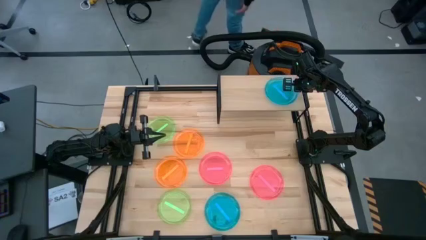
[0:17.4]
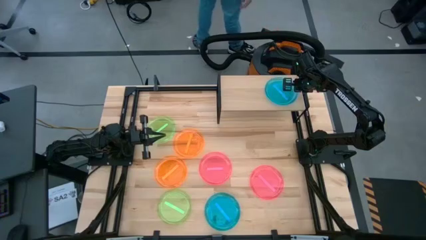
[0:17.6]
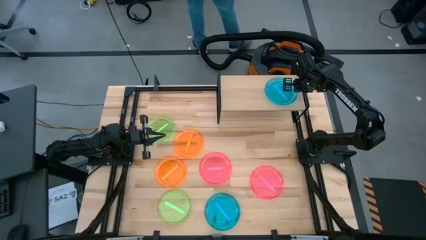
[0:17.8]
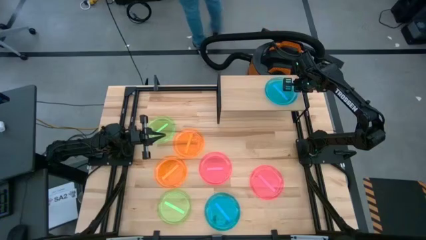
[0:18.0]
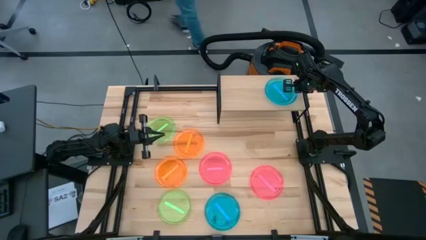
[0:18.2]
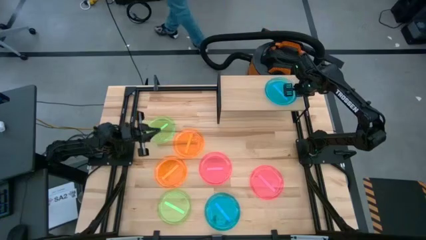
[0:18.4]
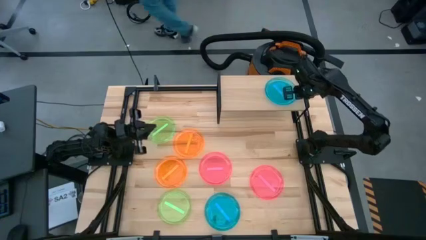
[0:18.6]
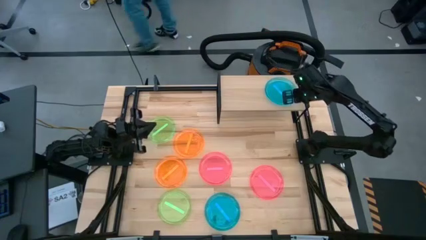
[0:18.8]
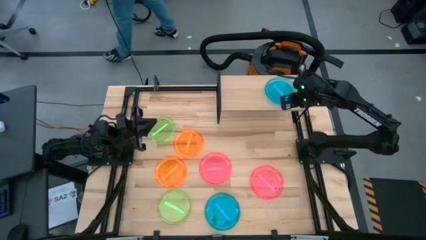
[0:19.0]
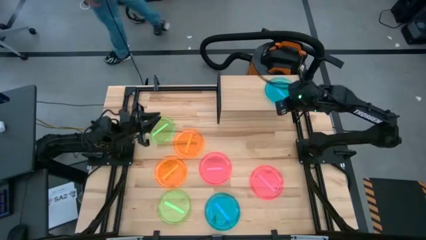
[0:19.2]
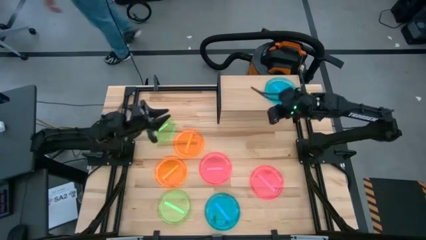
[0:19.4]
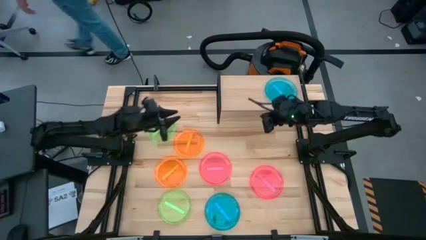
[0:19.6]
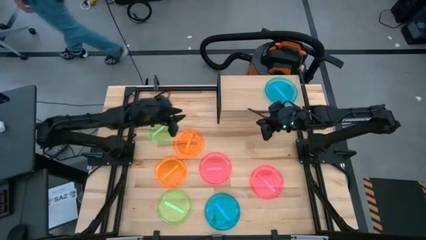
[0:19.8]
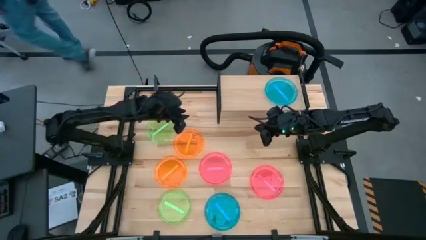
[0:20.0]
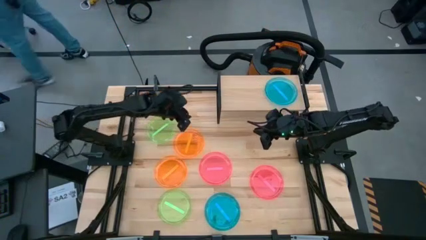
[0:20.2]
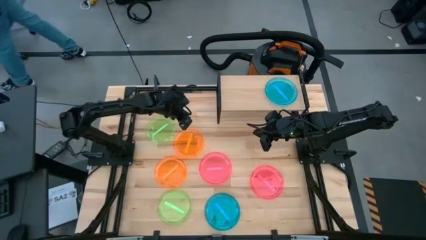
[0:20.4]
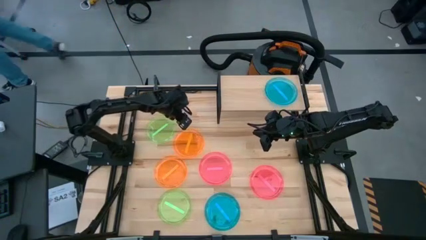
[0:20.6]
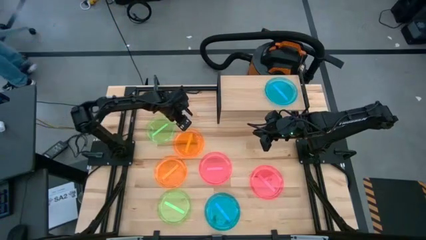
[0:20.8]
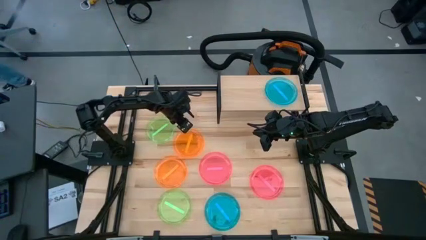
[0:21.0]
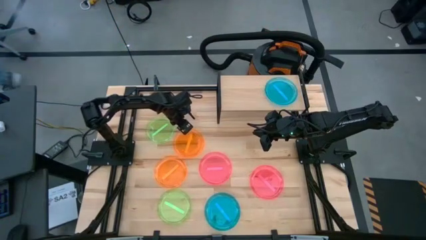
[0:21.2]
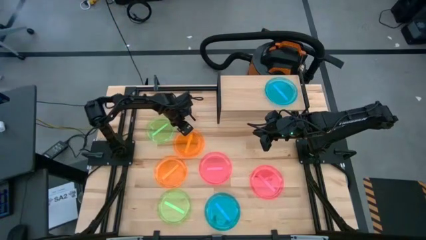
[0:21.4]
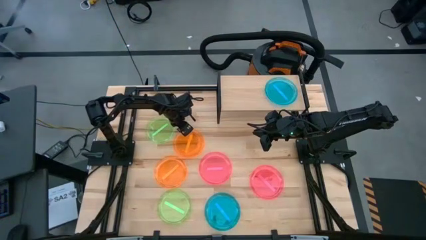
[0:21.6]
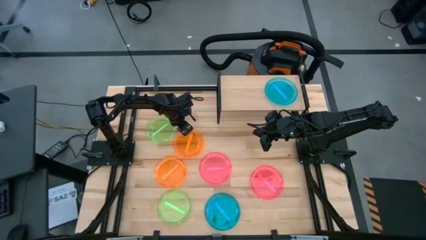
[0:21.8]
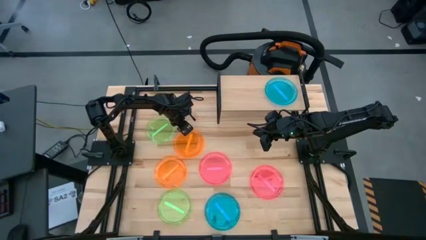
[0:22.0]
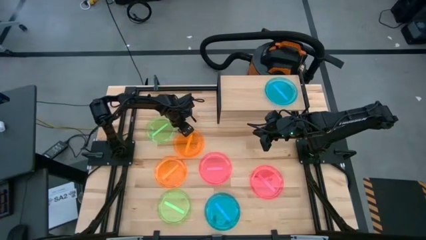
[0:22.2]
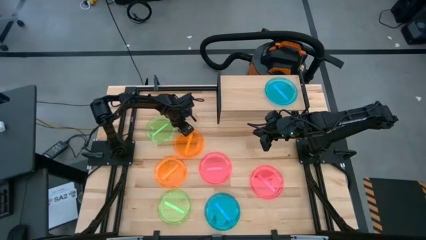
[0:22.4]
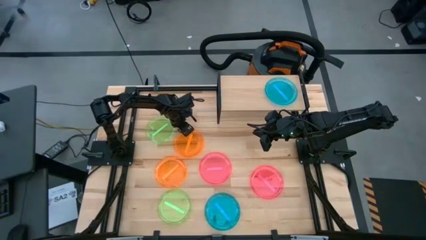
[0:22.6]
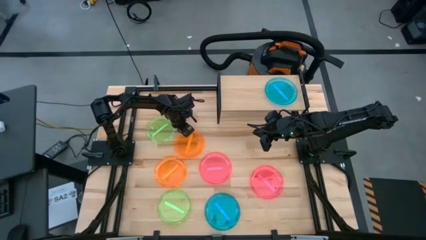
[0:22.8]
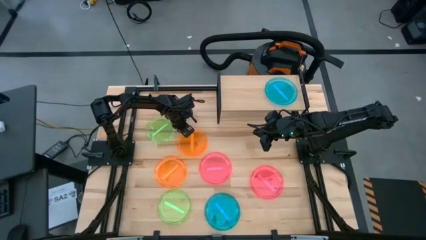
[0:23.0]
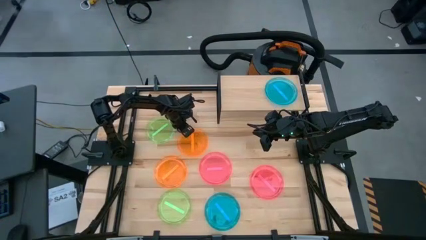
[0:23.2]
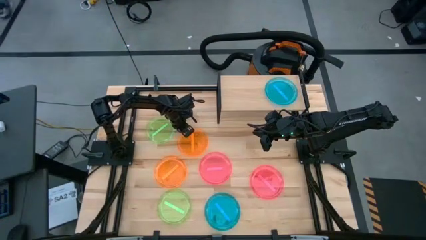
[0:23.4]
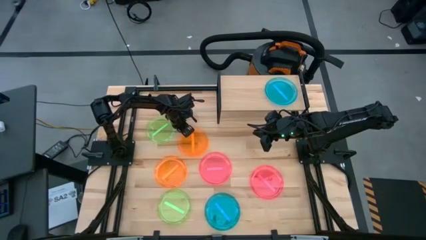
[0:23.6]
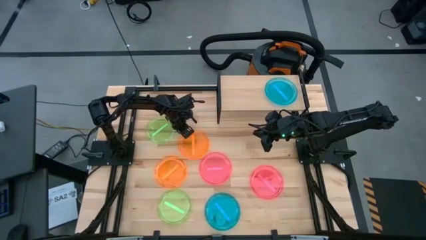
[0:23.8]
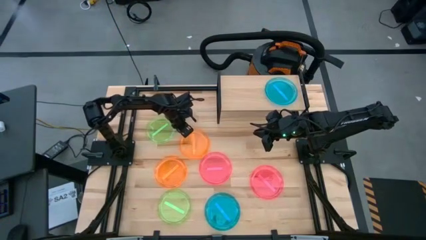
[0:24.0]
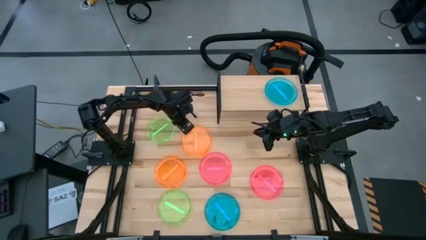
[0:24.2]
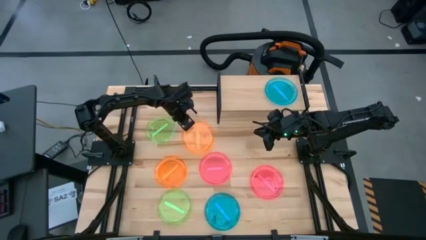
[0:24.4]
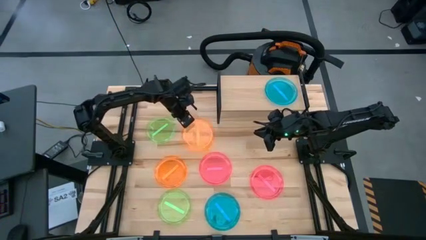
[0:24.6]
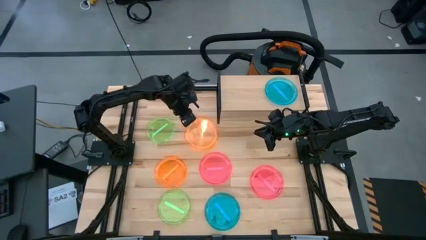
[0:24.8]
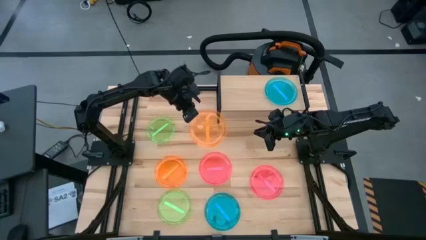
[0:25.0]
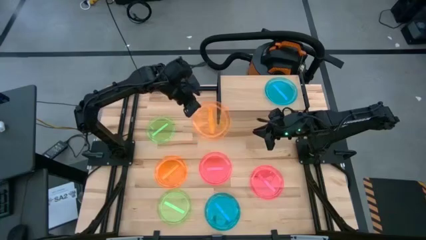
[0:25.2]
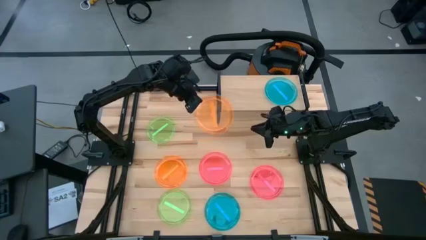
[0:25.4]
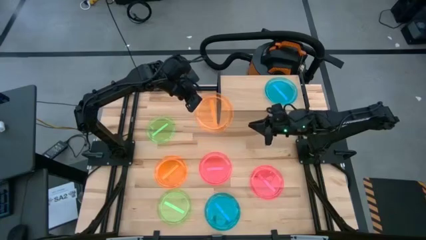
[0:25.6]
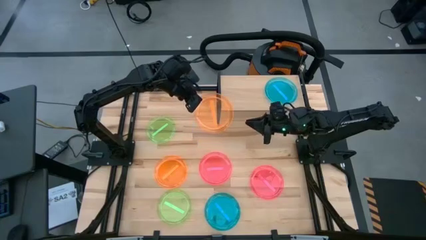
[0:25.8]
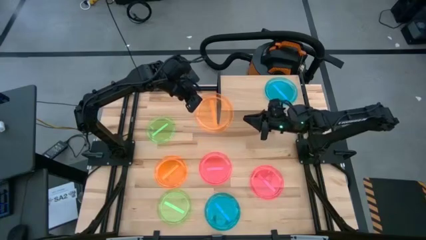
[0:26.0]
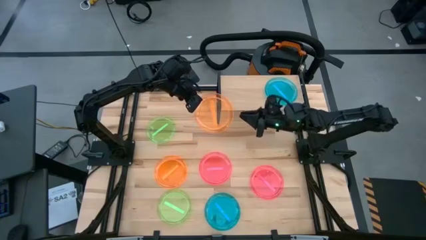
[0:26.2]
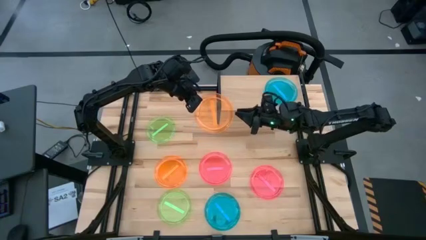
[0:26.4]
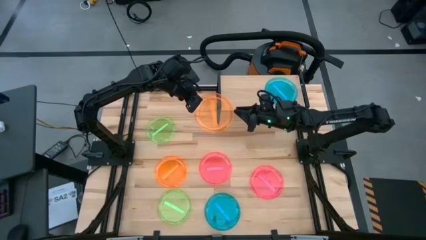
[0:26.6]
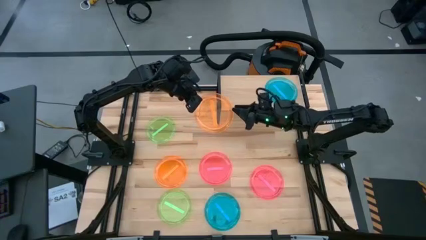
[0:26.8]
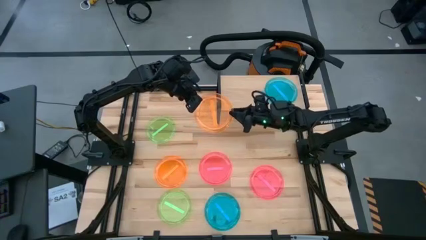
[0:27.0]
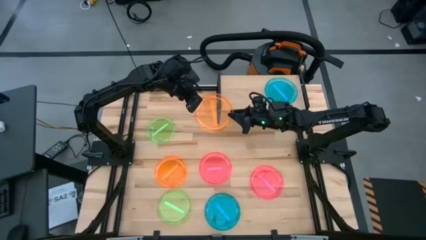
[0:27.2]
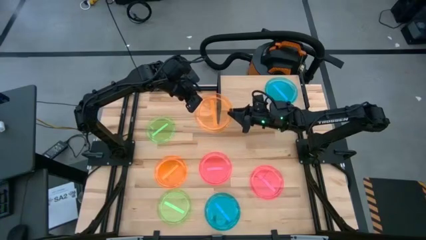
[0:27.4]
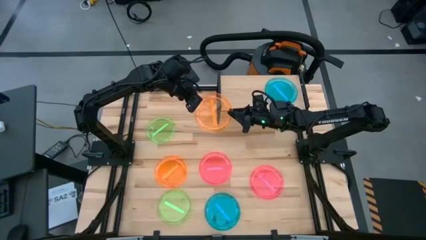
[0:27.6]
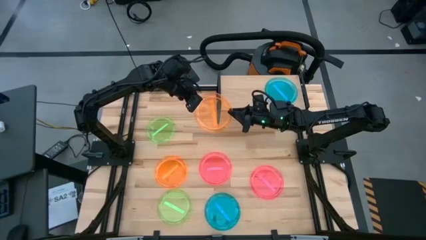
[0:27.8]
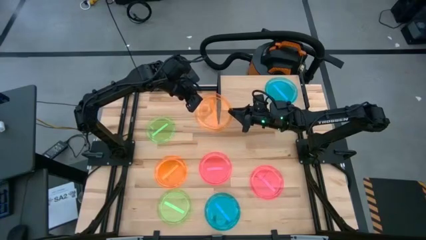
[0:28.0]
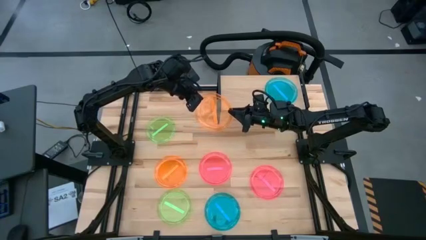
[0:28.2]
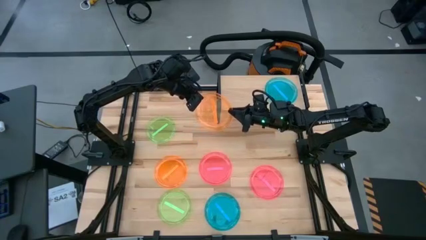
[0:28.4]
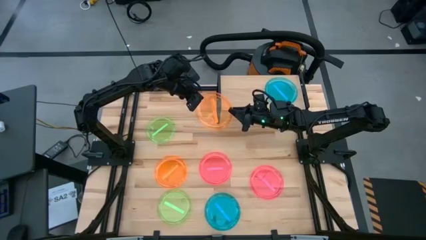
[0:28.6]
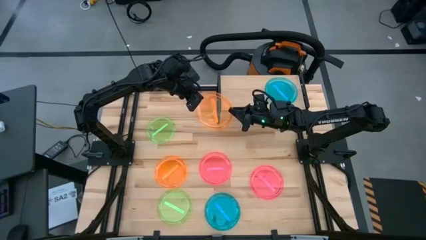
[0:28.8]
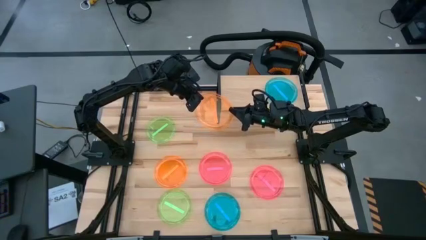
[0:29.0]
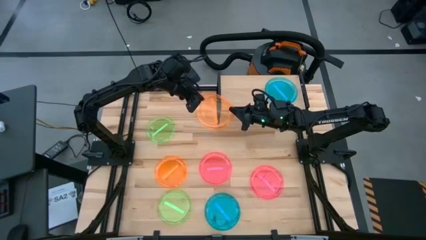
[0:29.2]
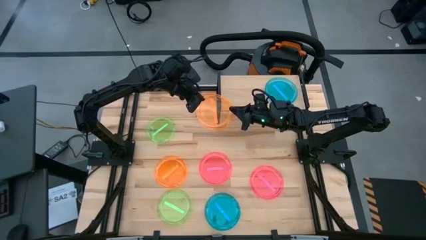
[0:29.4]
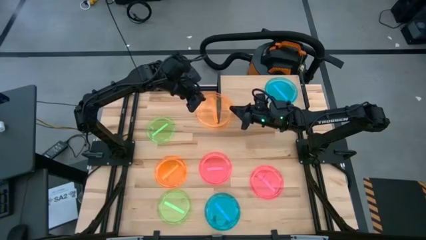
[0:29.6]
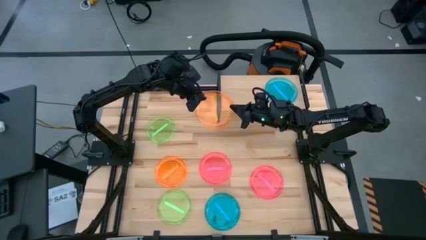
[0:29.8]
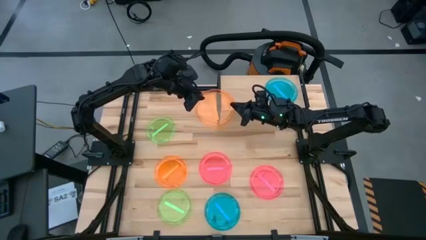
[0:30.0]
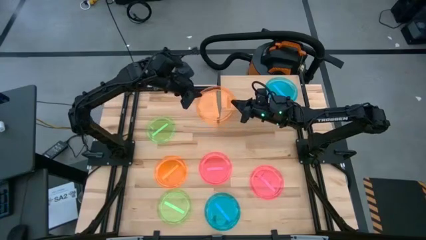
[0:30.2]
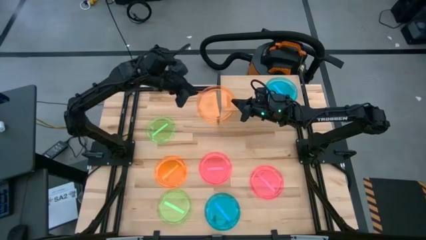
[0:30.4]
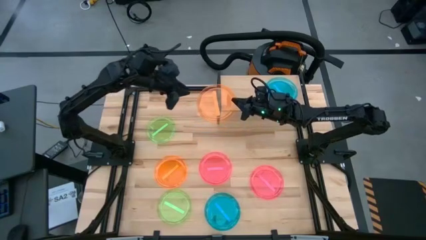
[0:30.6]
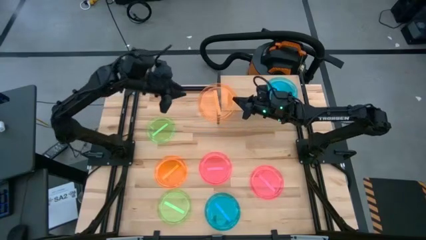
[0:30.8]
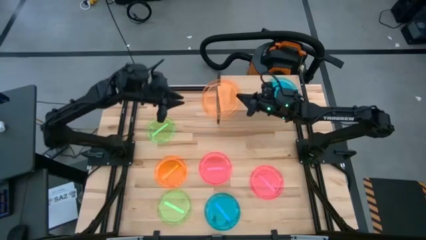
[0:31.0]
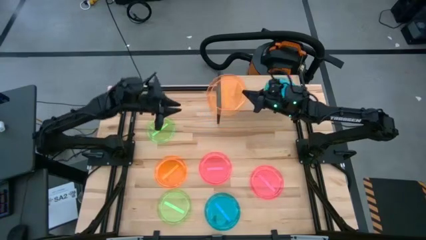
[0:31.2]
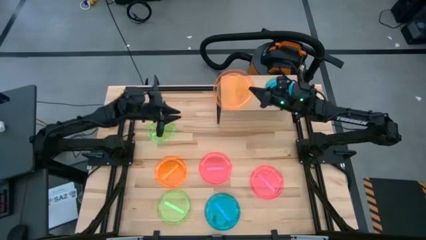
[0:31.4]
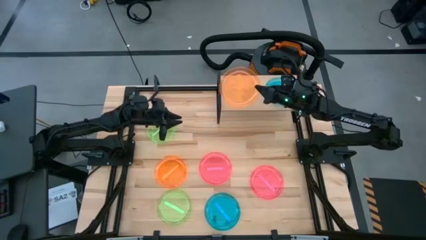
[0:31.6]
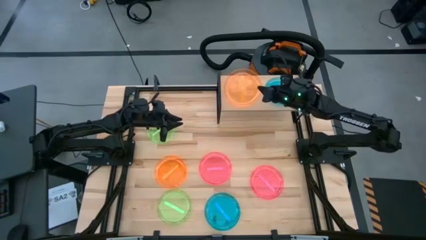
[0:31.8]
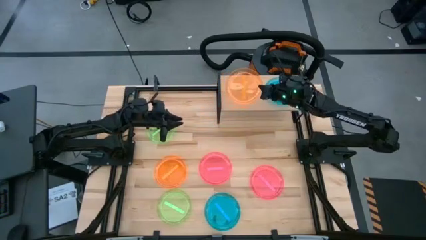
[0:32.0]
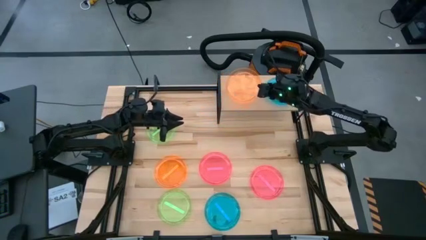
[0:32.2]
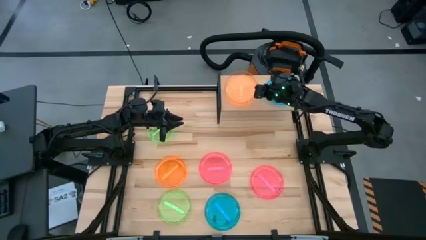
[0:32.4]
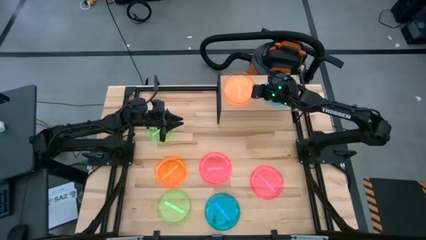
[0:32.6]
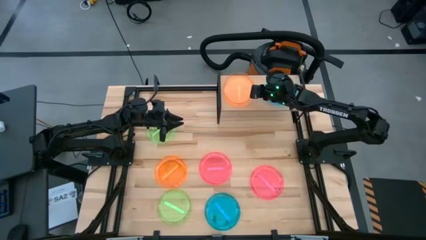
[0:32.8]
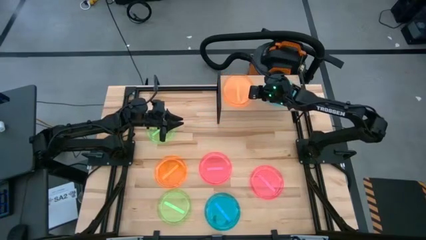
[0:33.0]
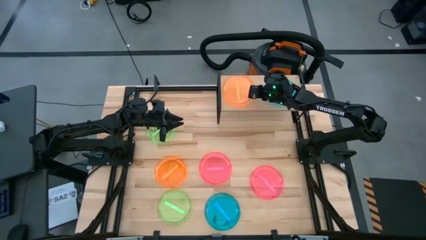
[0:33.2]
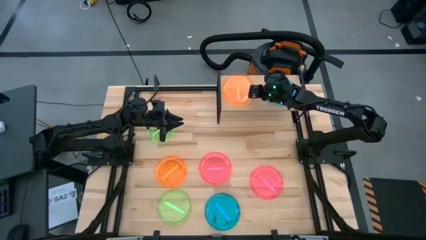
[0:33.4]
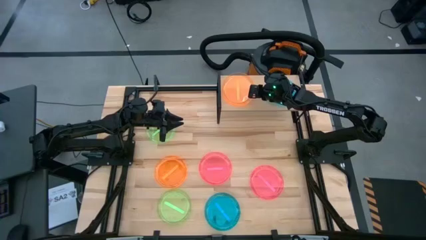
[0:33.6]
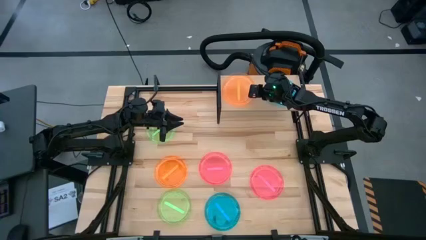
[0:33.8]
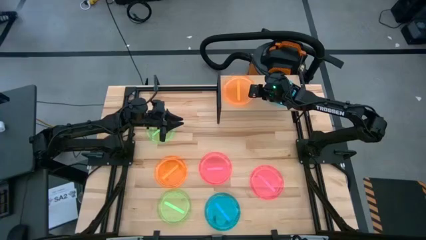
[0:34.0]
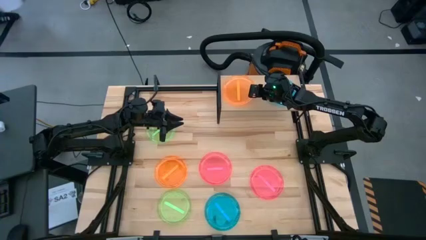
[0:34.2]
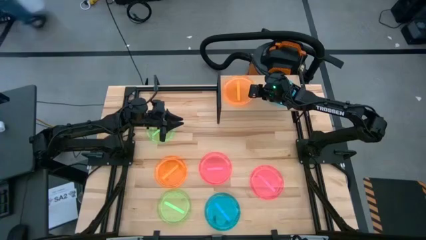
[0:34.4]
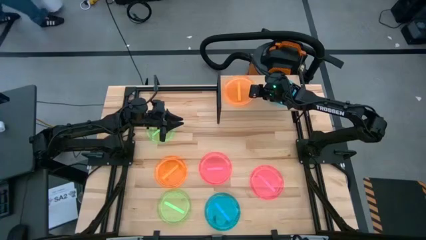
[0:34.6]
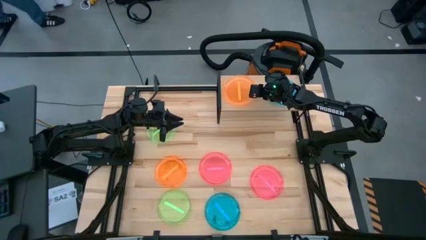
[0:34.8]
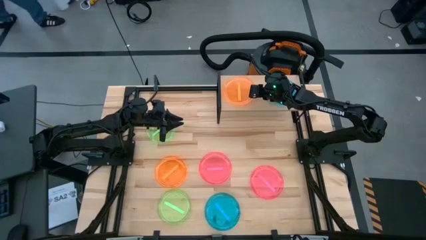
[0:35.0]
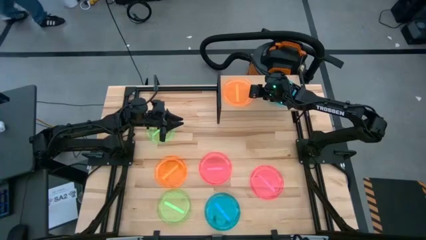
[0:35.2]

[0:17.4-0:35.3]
Task: Place and stack plates onto a shelf
Put the top orange plate on the shelf
